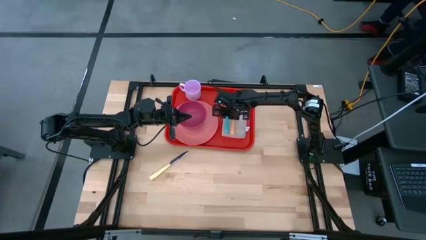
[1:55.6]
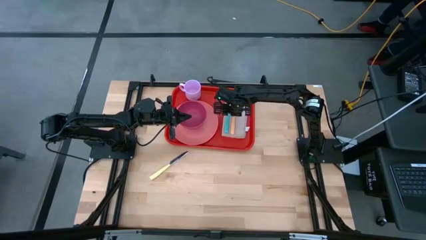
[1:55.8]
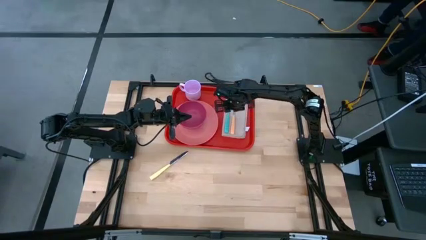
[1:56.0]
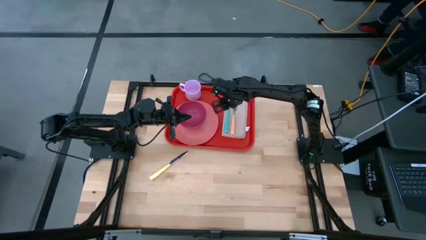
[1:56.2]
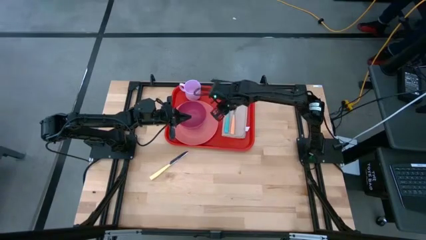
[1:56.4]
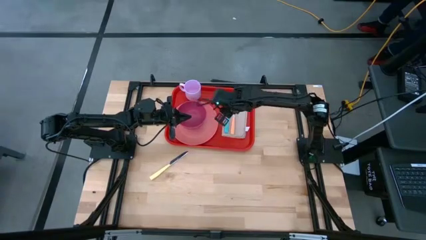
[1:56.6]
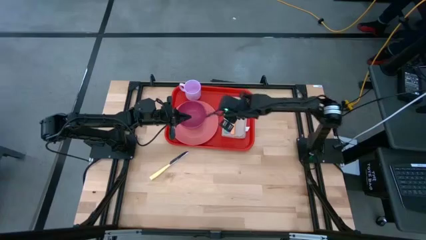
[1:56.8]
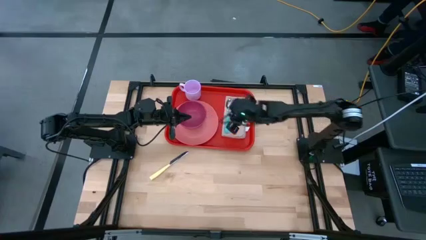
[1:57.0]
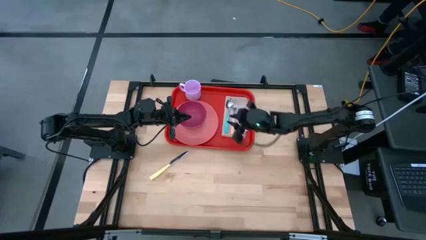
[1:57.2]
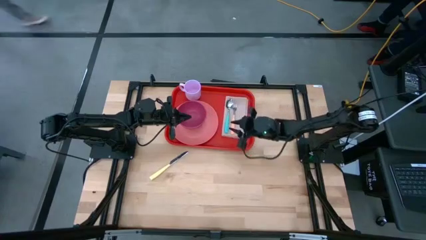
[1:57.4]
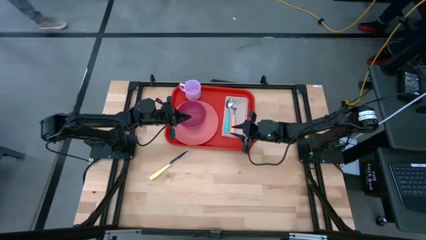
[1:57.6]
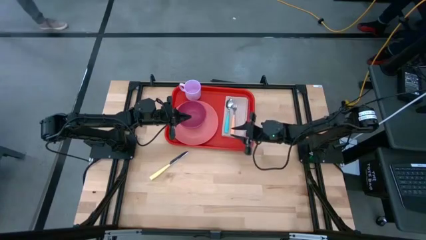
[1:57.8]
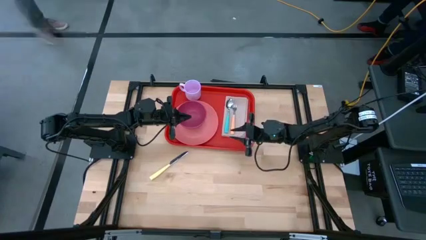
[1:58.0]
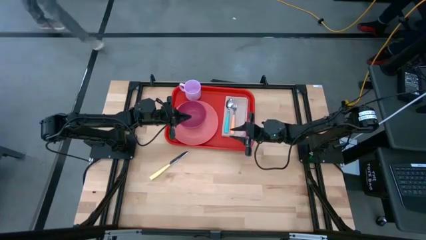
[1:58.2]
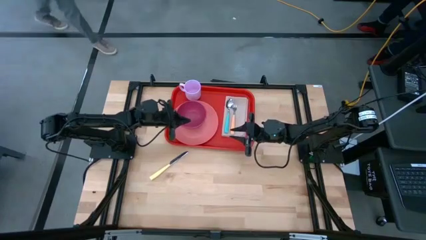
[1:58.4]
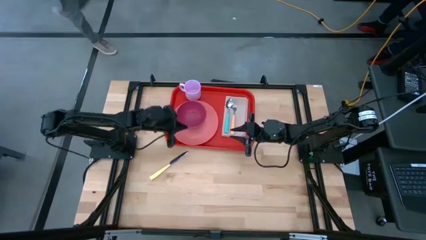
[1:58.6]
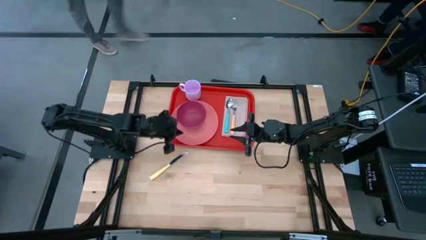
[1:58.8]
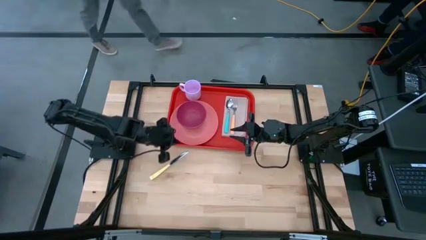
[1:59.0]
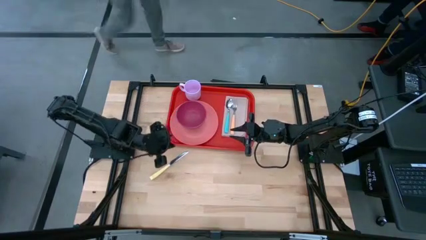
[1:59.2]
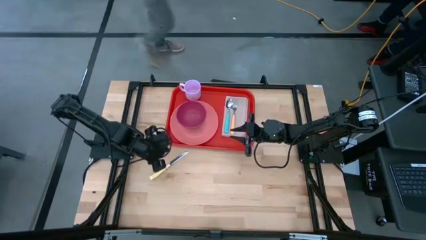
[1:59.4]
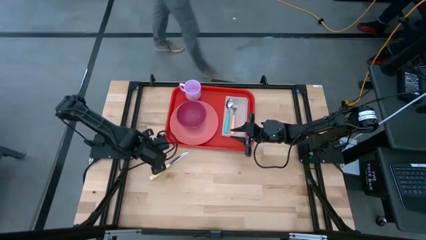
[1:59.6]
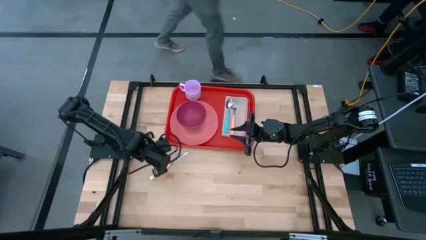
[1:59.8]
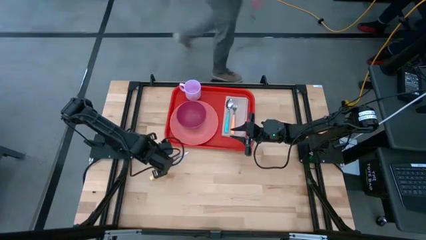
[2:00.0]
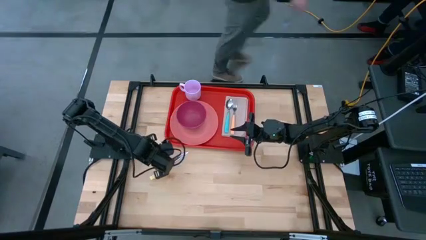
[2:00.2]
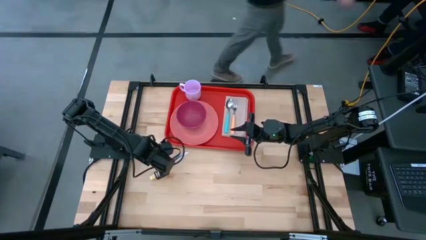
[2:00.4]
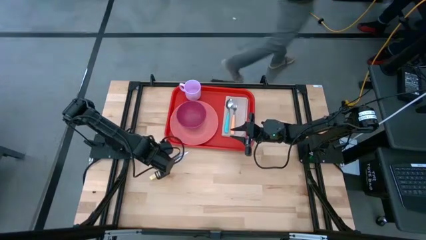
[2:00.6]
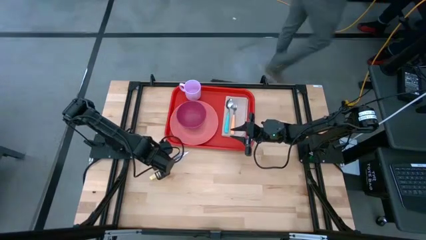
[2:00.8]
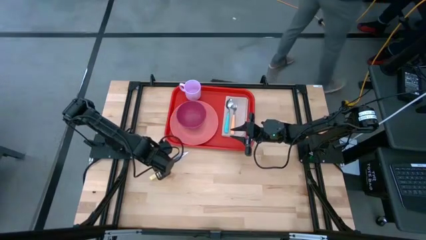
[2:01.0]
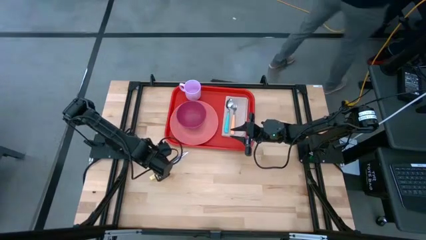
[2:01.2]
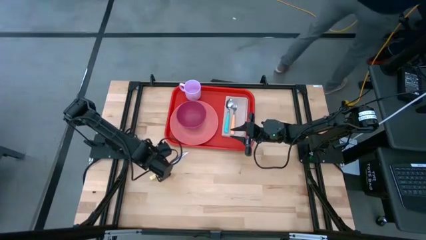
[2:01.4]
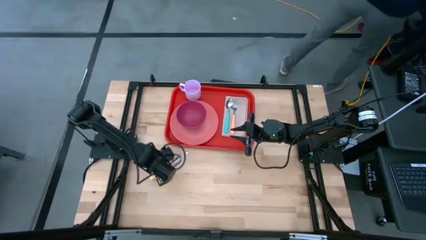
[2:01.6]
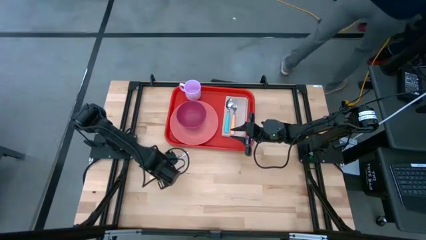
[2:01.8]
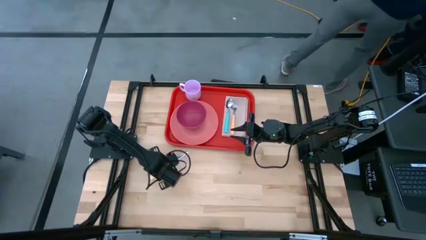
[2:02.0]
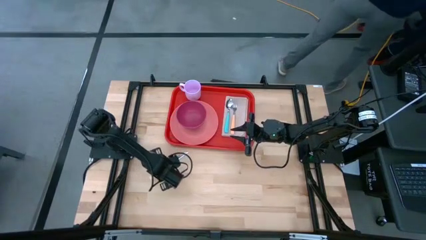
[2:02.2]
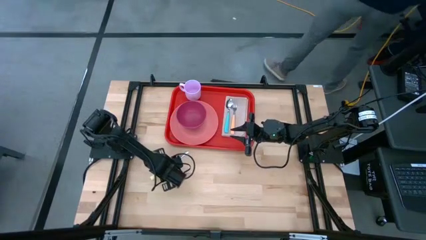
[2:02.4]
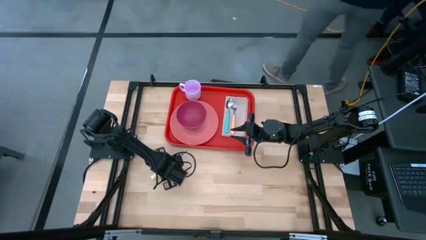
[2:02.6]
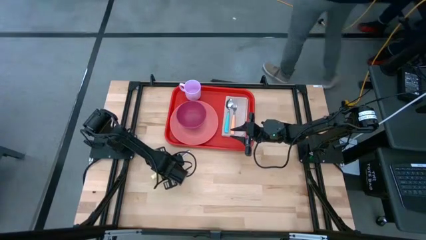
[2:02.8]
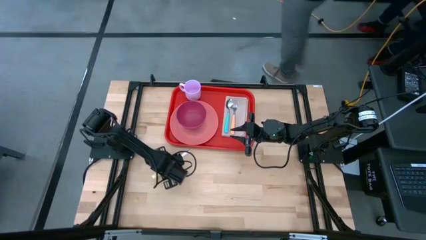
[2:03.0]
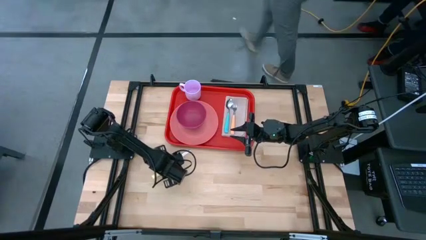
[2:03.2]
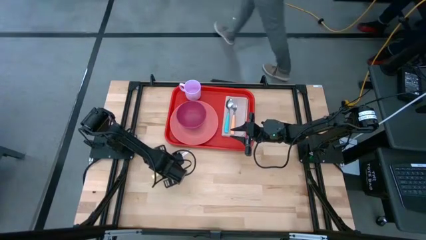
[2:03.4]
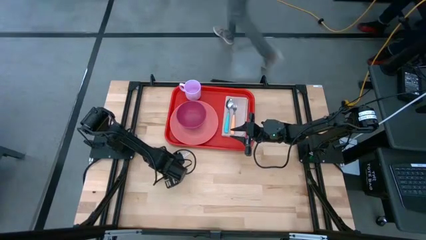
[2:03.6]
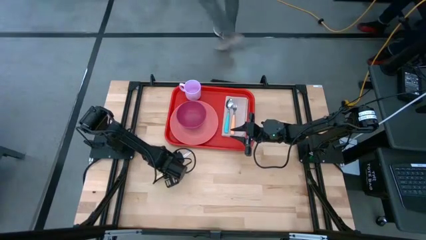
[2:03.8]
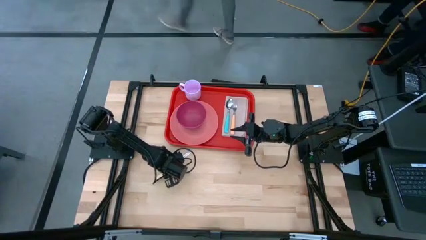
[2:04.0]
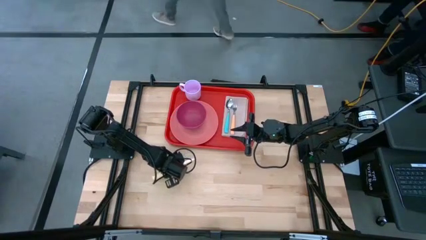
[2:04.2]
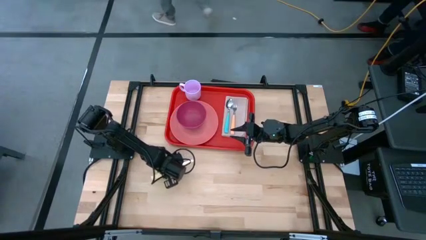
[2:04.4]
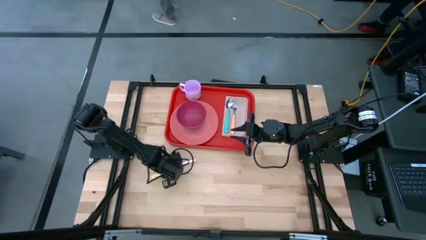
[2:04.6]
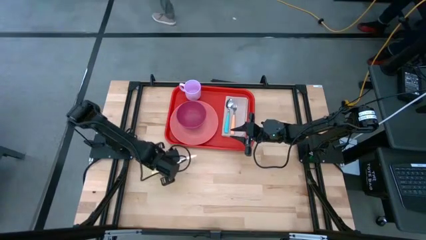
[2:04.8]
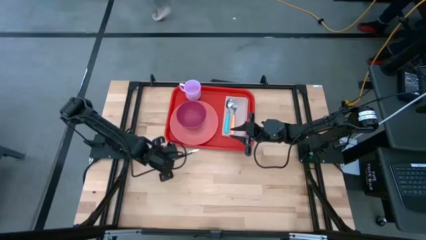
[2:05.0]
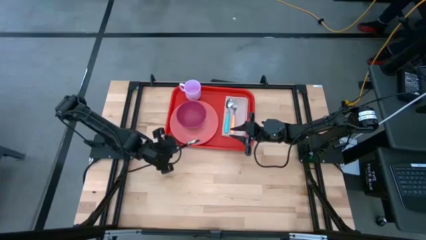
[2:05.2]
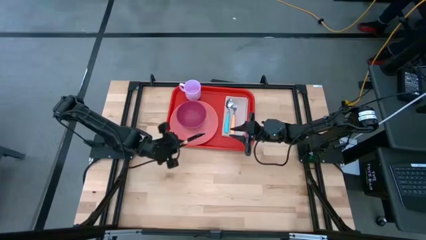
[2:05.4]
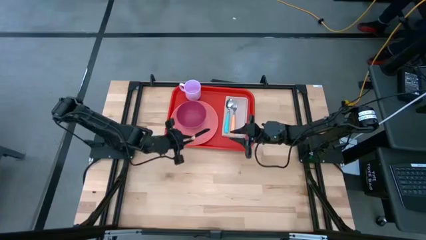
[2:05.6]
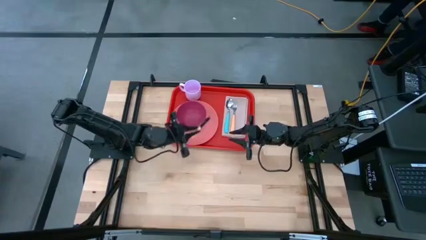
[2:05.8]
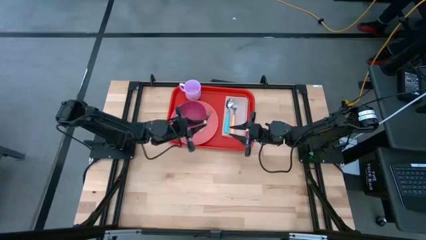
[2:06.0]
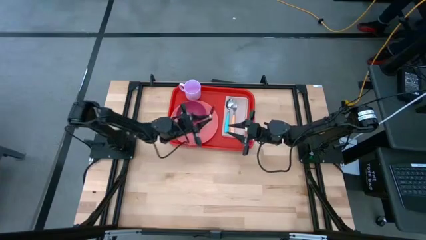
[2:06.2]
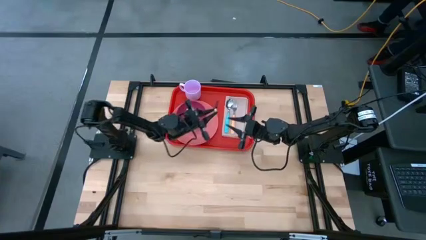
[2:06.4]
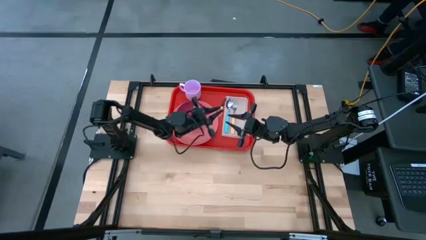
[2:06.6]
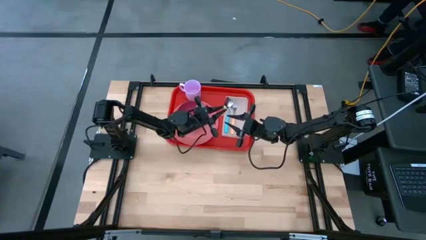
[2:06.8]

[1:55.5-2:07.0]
Task: Set up tray
Put the yellow knife on the light brown napkin

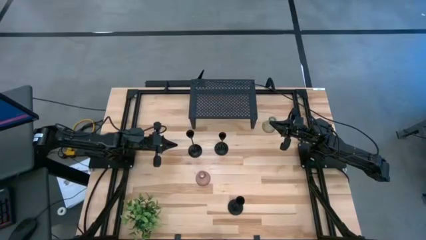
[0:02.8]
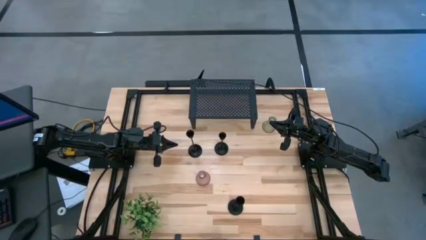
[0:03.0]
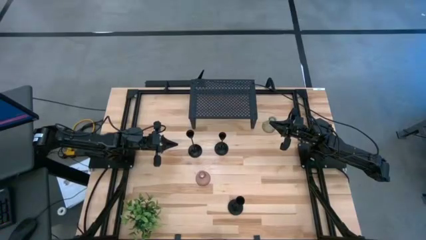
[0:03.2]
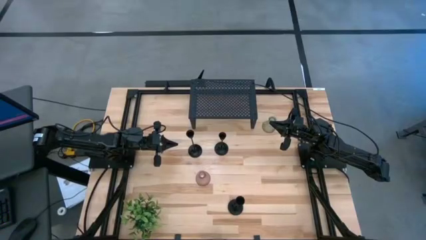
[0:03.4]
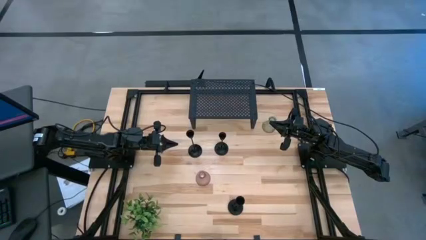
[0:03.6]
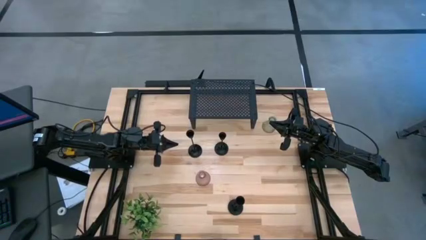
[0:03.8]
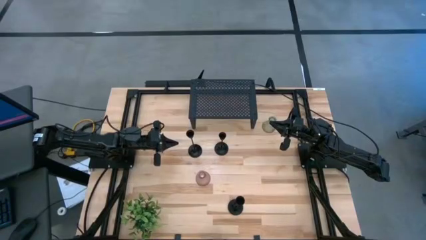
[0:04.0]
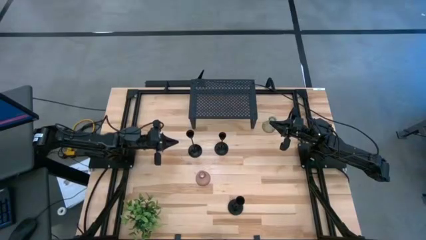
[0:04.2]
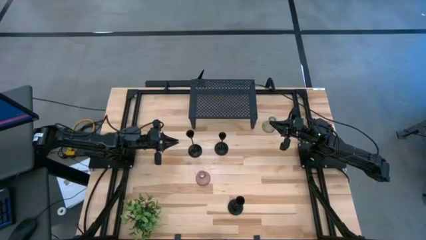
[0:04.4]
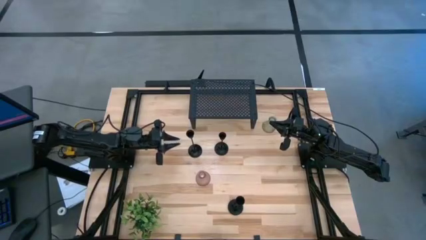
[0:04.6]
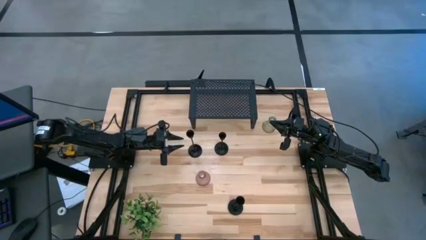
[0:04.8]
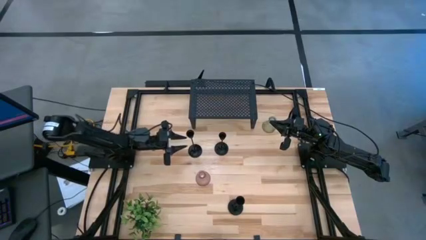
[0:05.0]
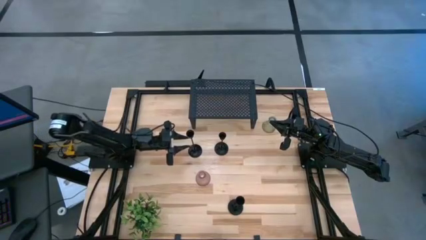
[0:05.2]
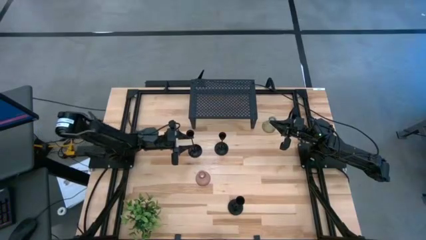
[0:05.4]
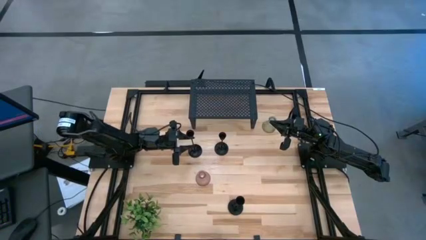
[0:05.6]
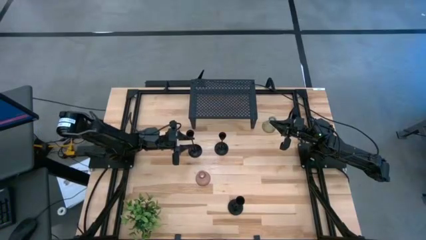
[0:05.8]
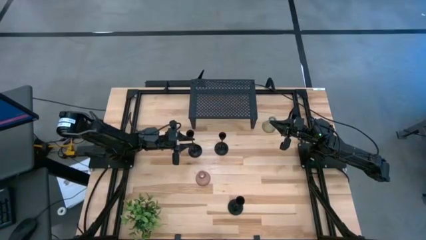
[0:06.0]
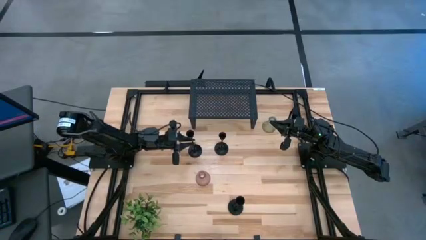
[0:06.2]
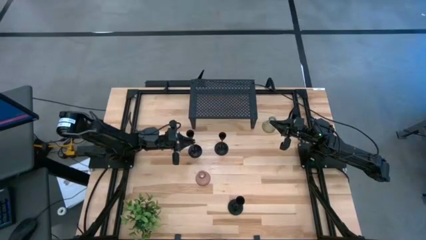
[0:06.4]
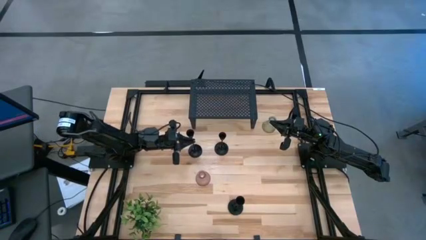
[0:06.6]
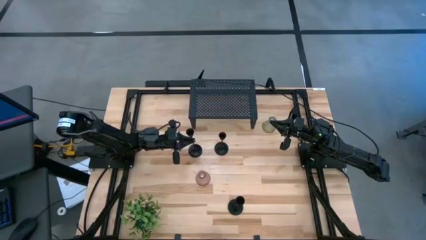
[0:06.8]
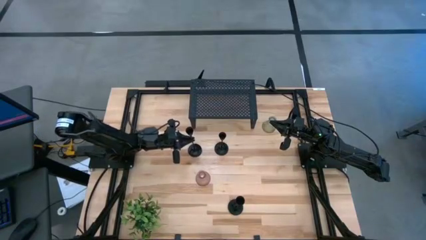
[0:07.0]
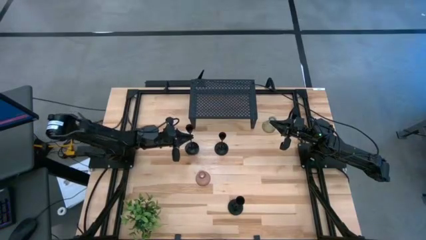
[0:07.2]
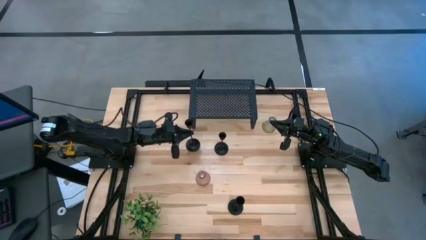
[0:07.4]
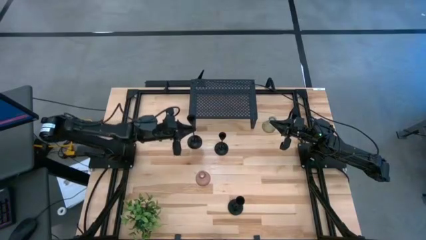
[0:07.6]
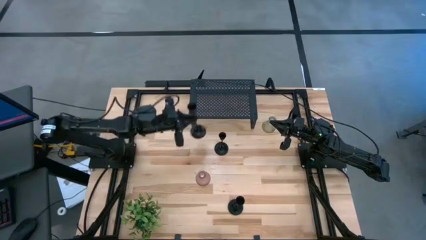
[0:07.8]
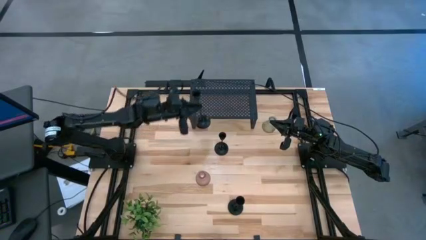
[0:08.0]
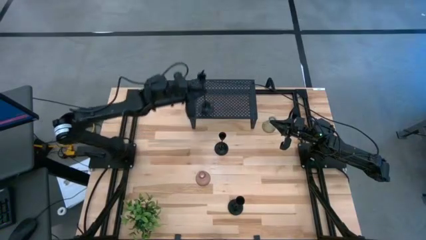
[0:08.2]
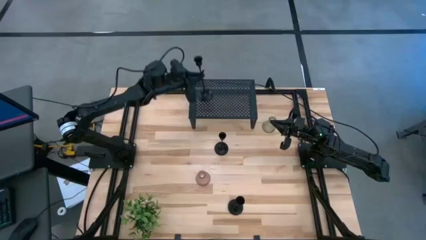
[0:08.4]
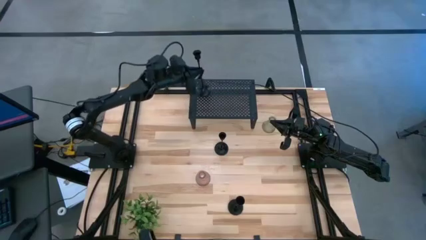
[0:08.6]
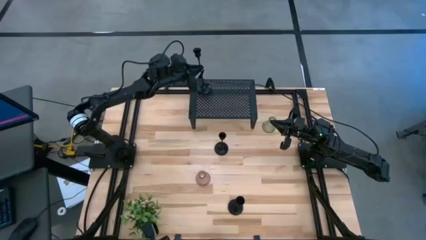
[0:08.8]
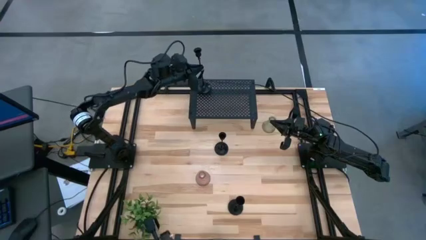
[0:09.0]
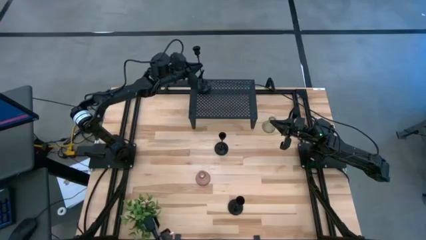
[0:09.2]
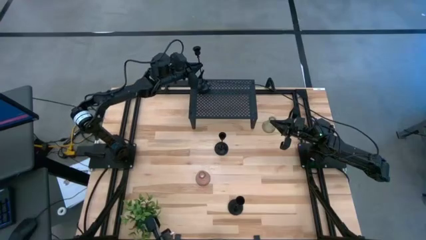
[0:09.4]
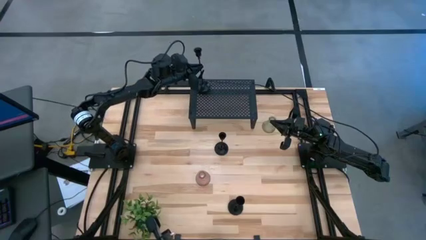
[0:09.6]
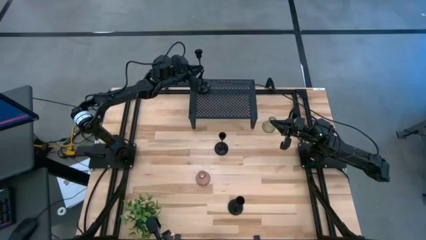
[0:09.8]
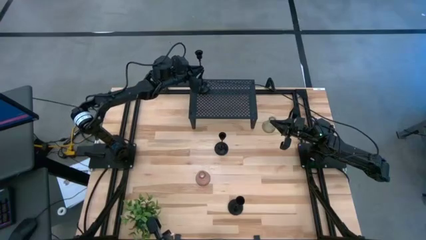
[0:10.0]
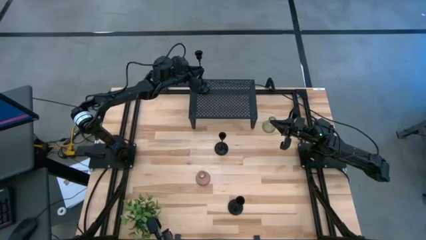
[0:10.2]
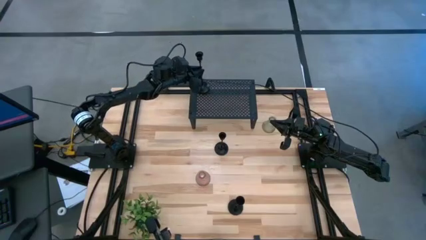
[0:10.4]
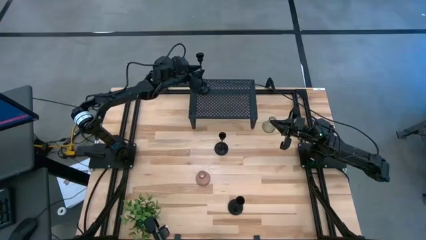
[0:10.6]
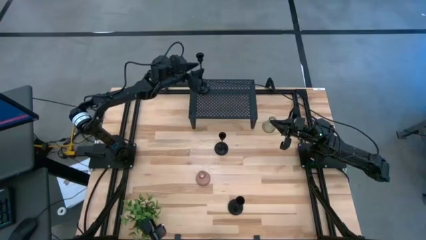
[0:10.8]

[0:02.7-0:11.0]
Task: Pick & Place candle stick holders
Put the top left black candle holder on the shelf
